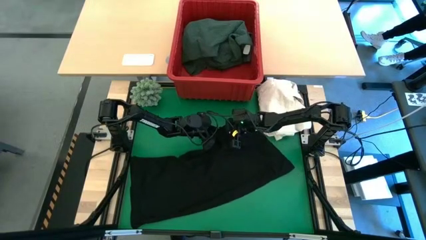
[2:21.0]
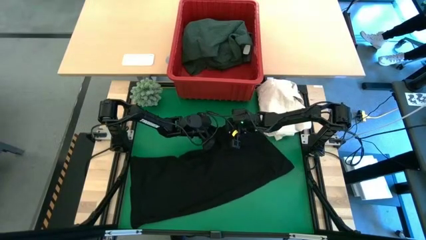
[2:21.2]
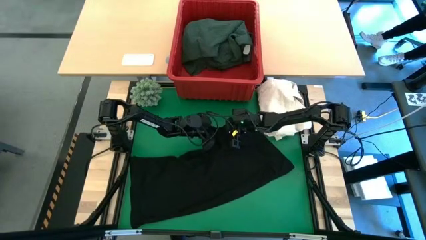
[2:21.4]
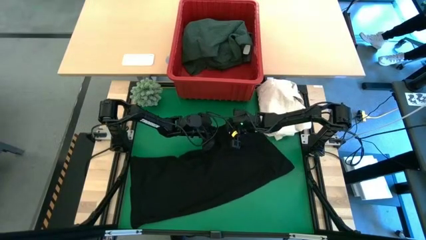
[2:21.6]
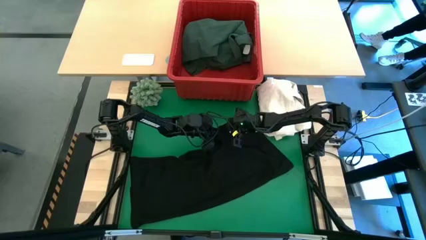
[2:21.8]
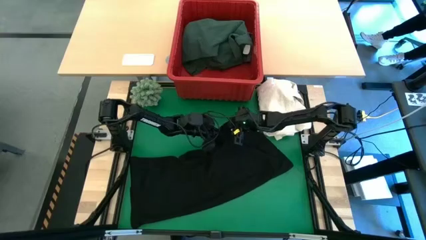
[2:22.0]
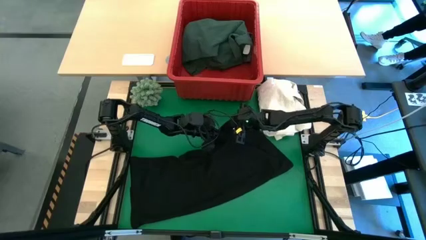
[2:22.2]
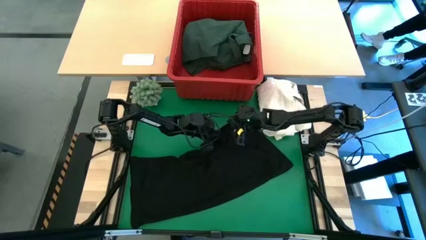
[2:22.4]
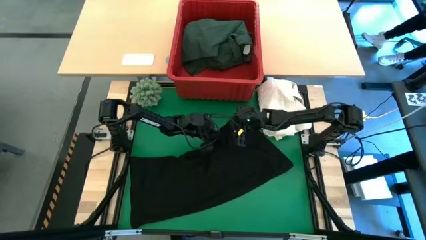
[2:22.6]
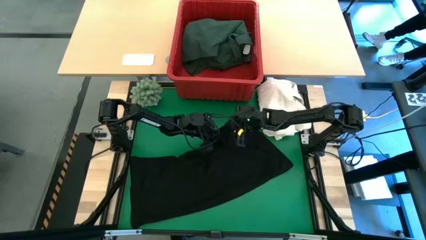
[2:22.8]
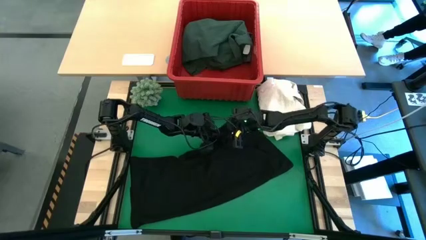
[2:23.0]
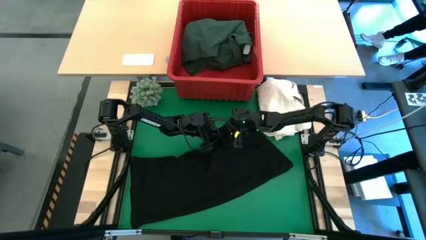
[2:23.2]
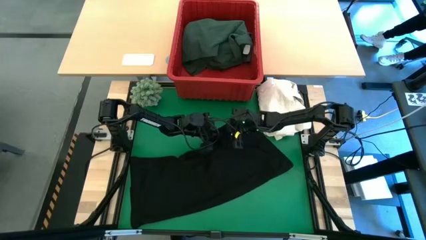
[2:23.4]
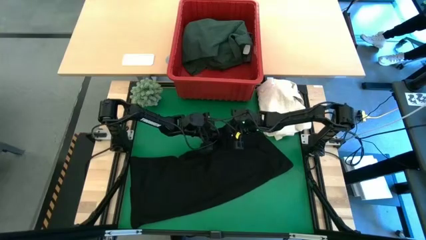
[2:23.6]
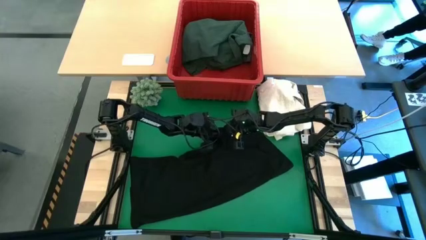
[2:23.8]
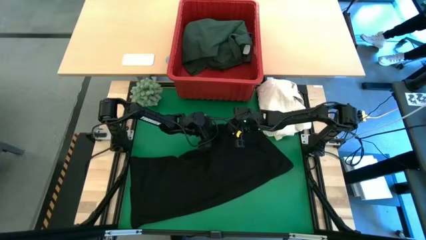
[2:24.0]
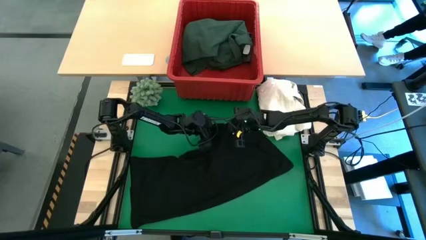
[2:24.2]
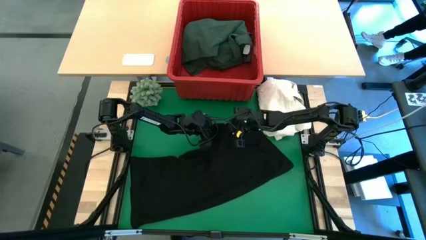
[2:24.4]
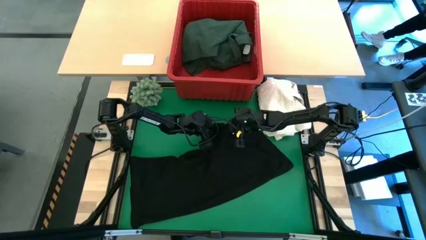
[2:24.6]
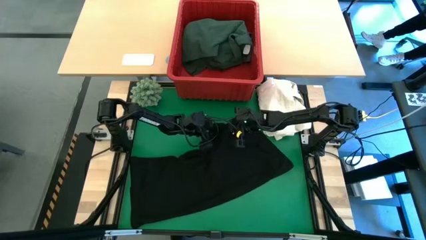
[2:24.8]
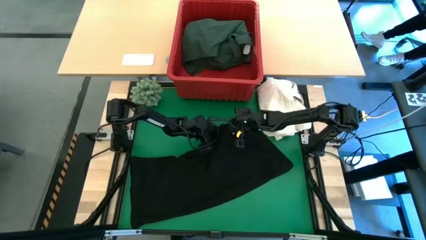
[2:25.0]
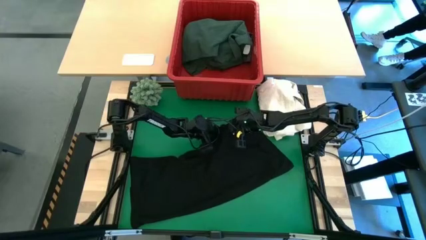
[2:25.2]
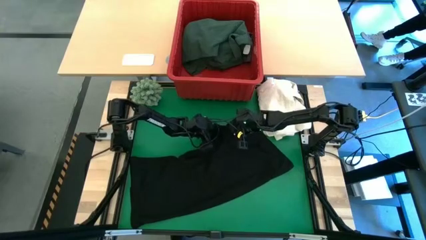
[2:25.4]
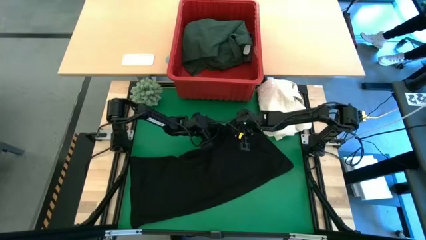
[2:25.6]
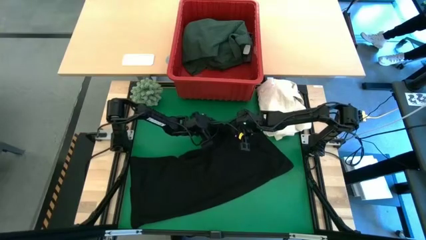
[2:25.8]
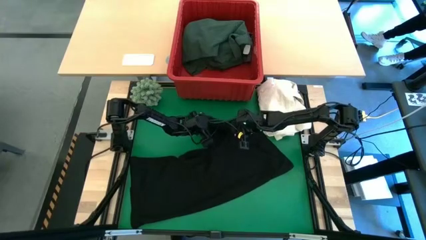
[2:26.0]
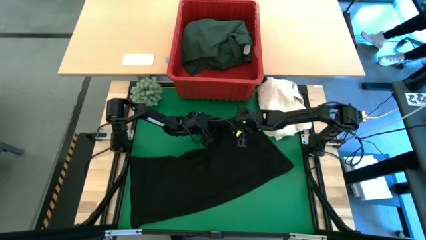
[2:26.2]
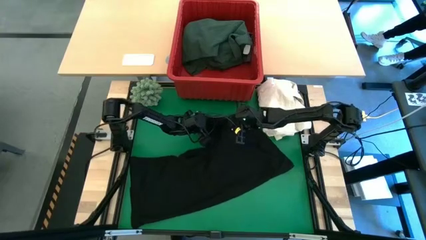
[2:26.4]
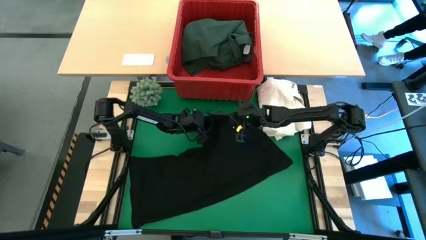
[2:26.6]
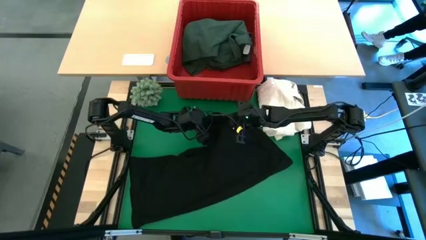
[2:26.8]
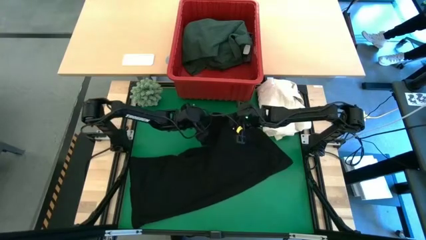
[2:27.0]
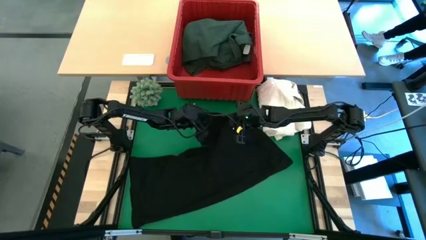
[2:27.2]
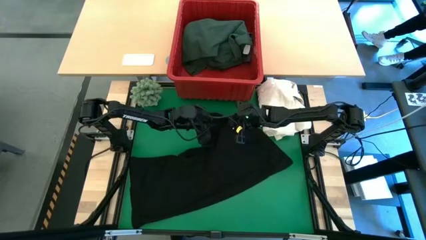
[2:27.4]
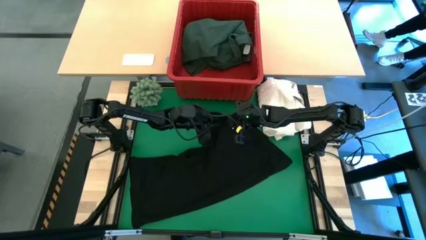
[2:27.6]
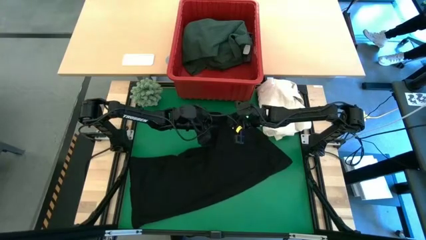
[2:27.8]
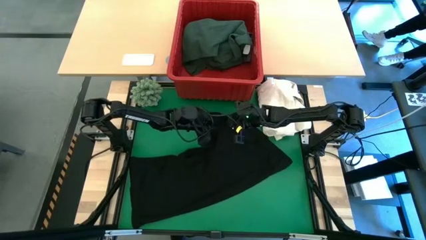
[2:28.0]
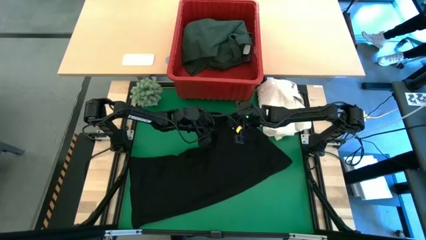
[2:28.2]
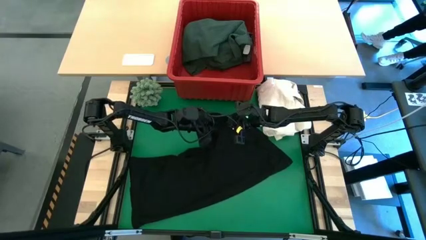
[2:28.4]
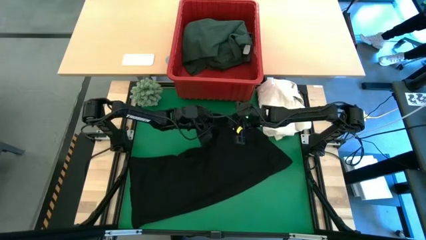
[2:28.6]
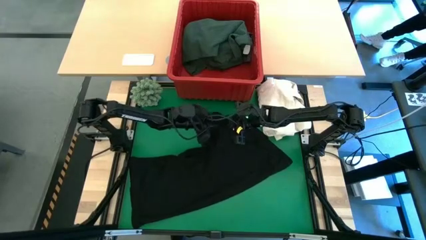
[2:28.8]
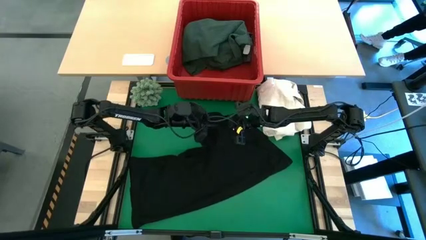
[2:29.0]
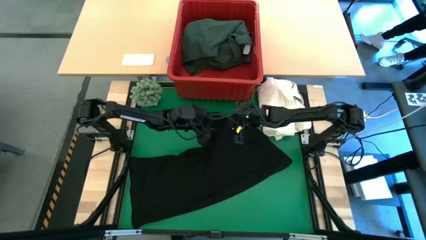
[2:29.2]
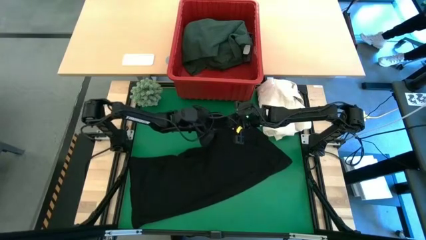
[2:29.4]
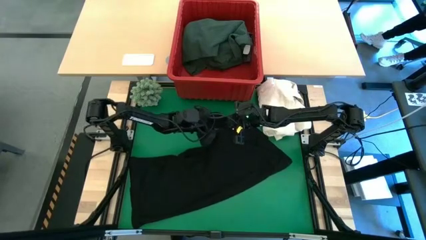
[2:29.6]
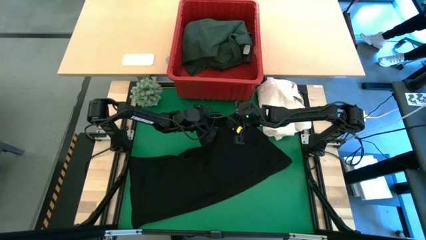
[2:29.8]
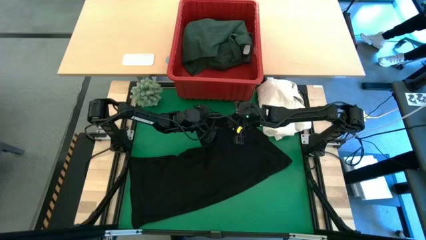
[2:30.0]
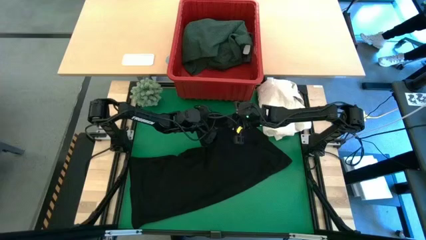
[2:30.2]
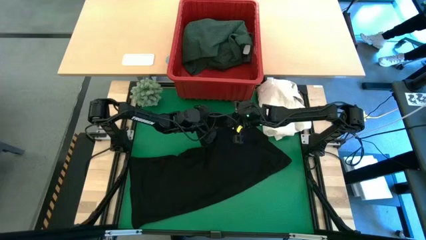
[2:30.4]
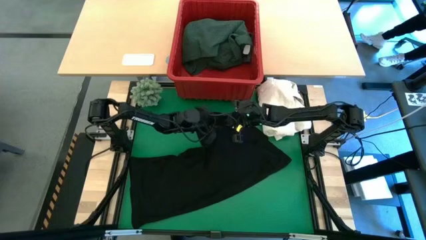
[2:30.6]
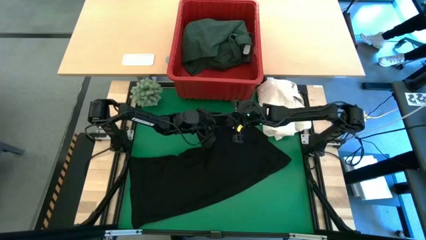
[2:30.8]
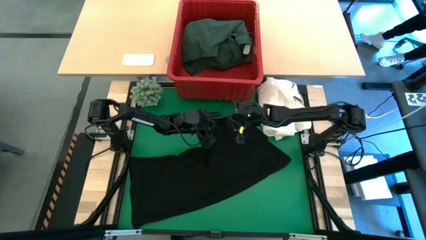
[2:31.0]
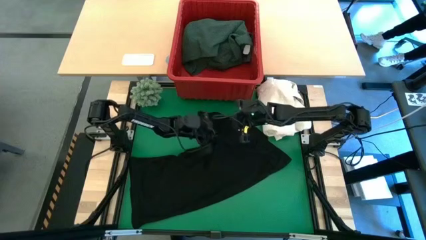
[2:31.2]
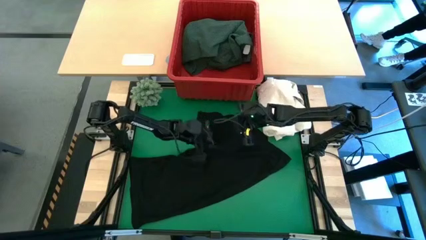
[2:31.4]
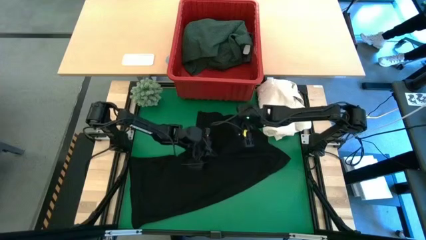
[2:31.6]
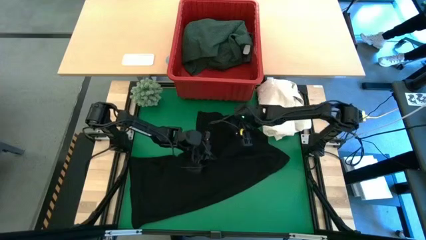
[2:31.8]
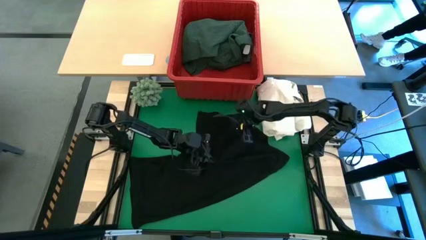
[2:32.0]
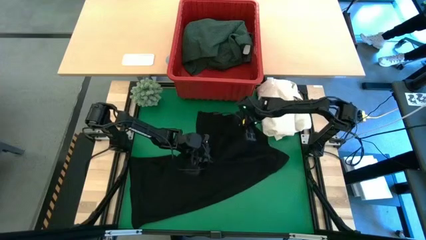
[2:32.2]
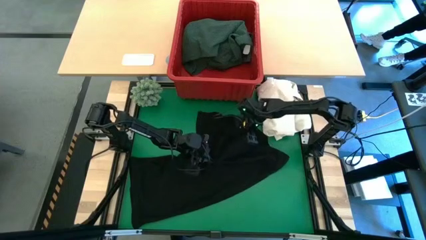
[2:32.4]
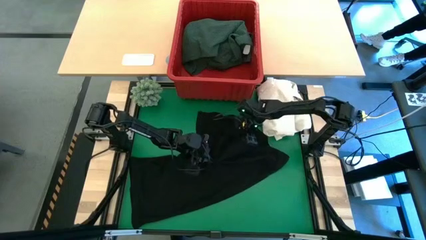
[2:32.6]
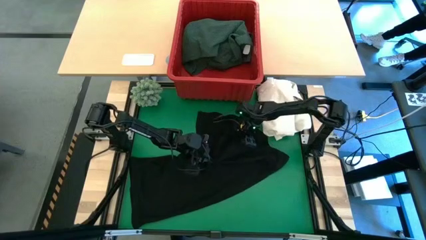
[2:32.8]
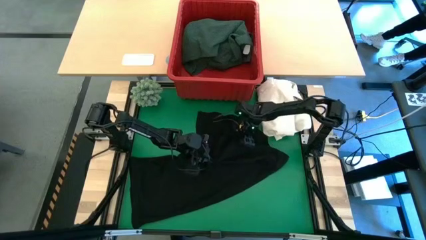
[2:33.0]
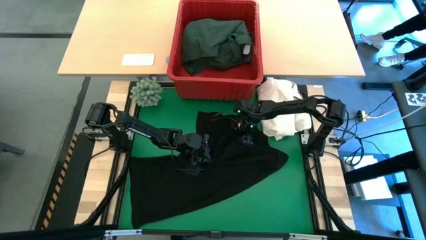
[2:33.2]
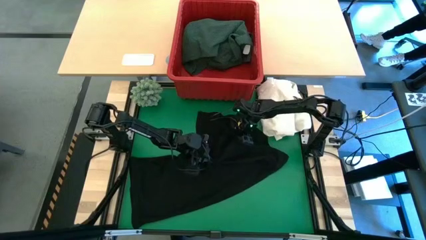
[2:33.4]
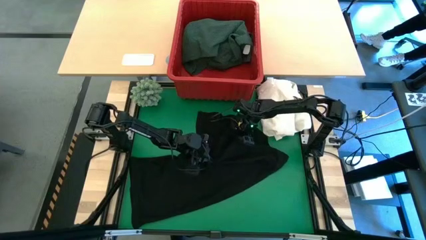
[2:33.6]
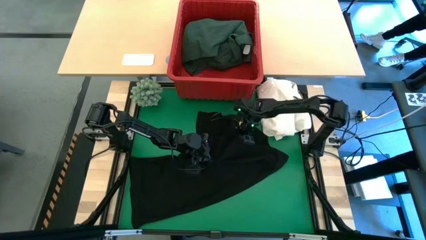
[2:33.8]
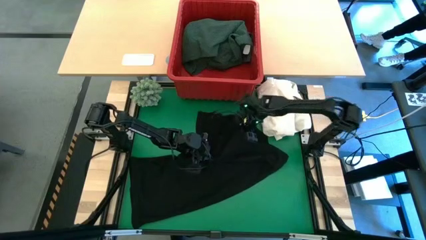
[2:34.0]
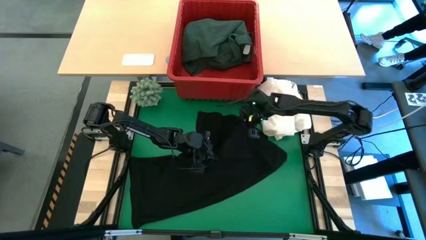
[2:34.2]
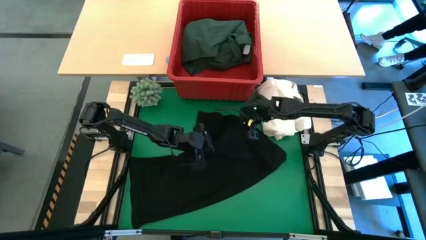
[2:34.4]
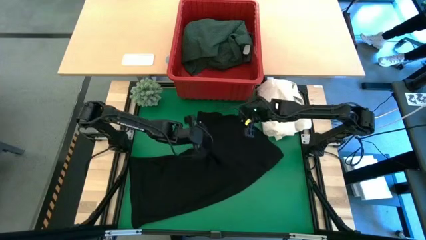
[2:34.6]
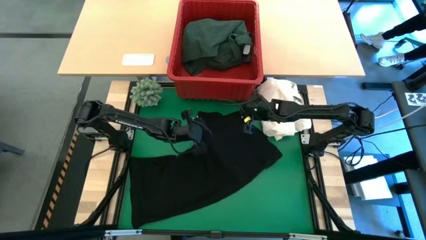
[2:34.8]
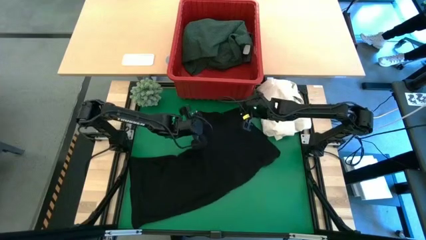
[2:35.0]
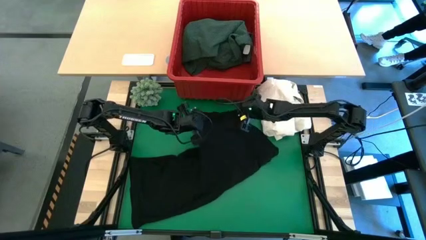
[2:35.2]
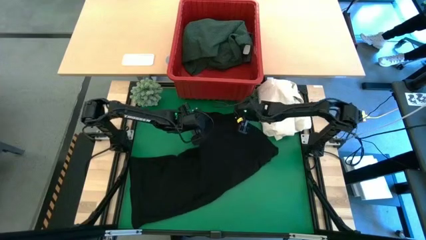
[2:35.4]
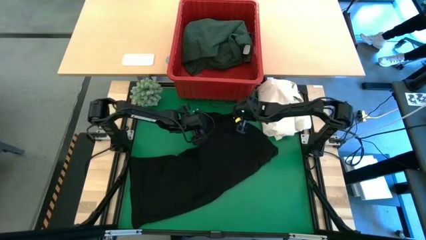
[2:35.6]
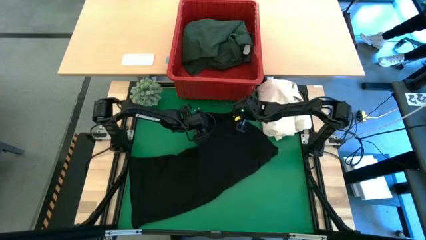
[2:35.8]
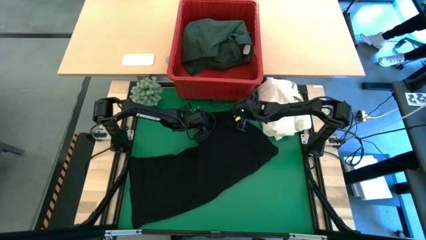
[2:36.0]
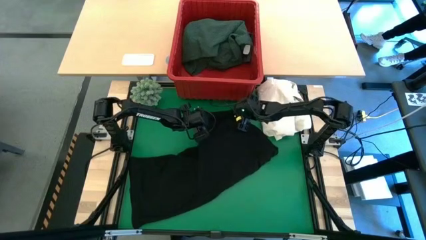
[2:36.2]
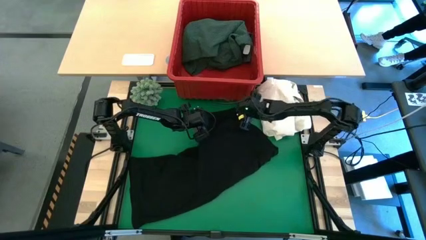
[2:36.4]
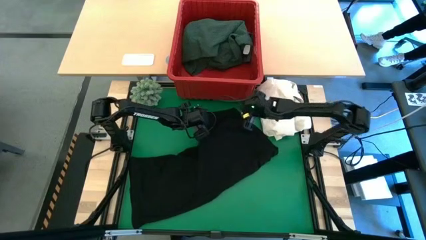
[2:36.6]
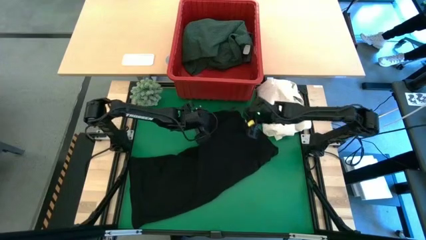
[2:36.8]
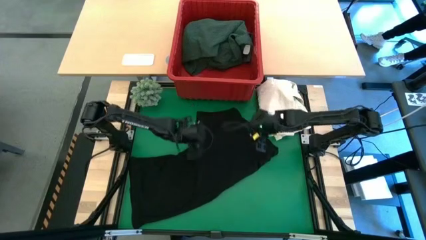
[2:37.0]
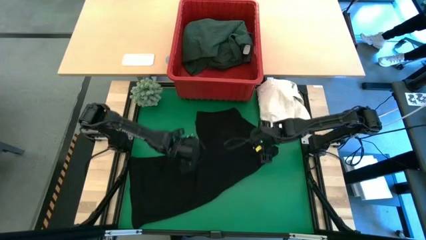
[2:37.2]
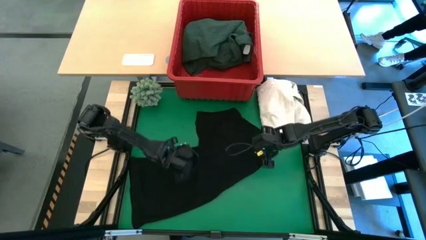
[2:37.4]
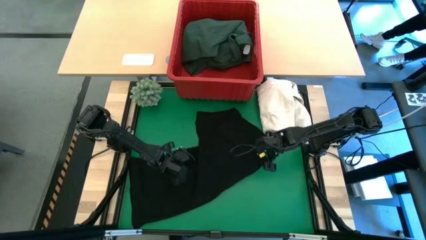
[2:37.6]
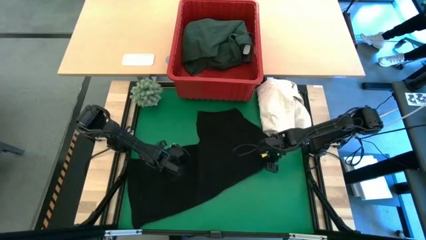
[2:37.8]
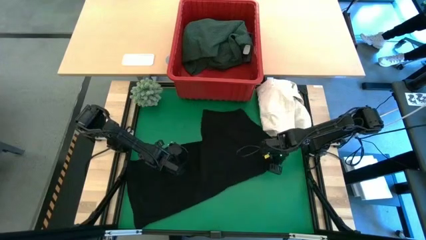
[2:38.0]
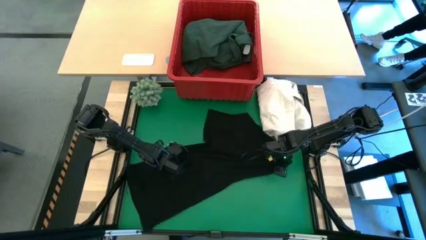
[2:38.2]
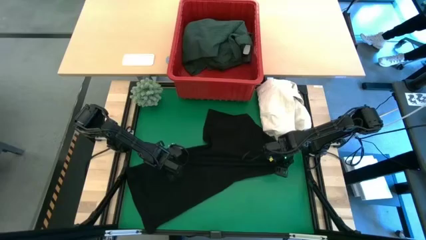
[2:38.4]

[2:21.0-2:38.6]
Task: Fold laundry
Fold the black shirt
